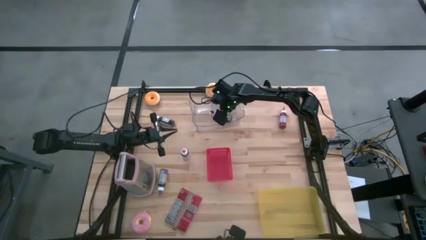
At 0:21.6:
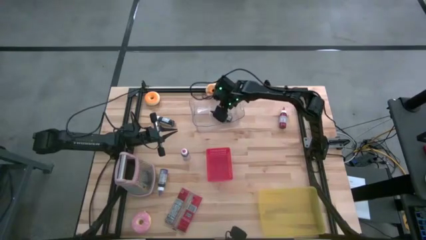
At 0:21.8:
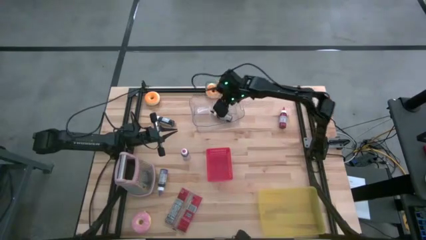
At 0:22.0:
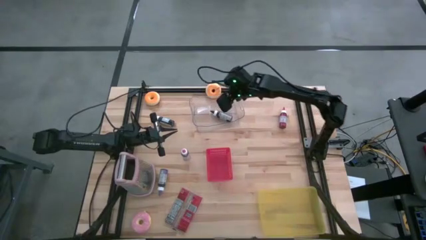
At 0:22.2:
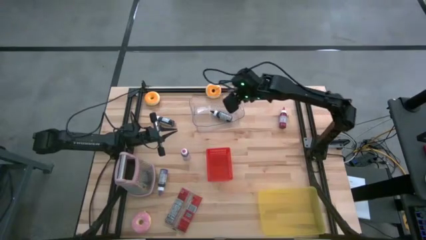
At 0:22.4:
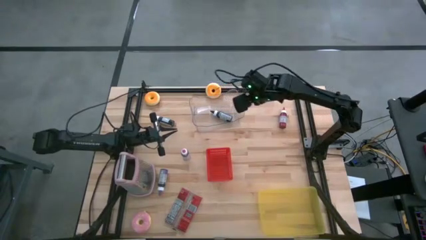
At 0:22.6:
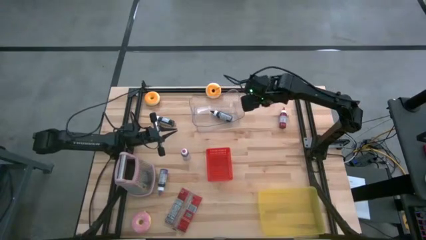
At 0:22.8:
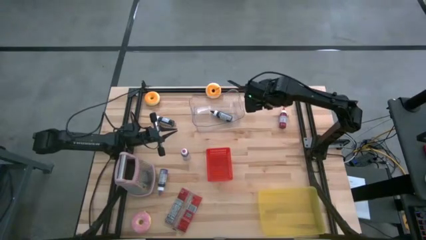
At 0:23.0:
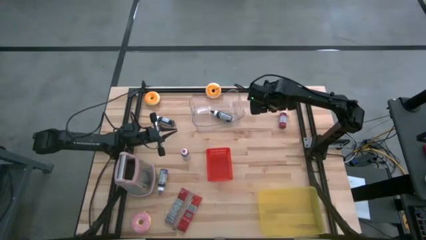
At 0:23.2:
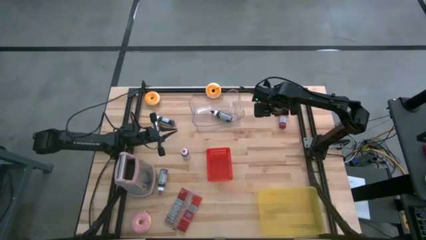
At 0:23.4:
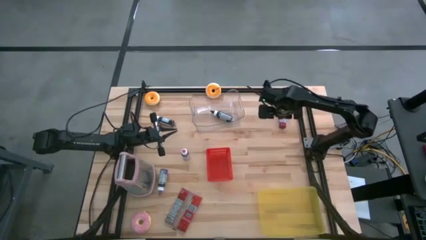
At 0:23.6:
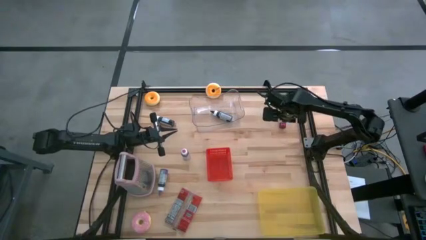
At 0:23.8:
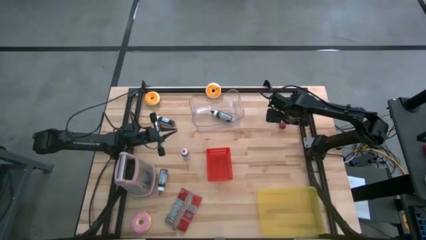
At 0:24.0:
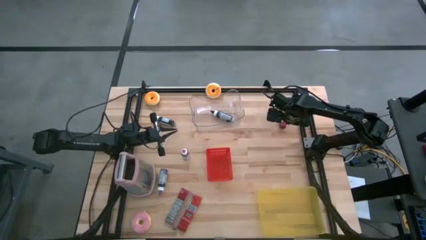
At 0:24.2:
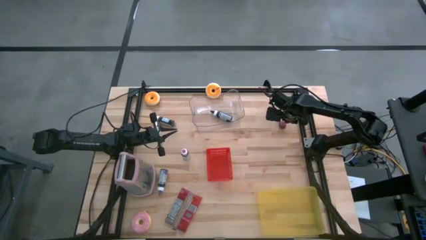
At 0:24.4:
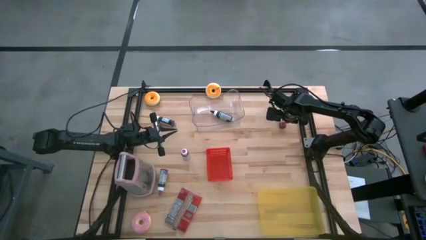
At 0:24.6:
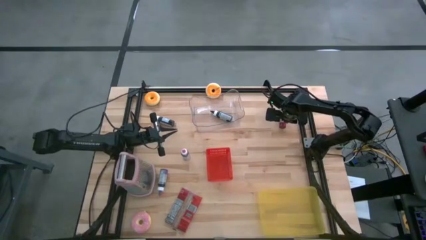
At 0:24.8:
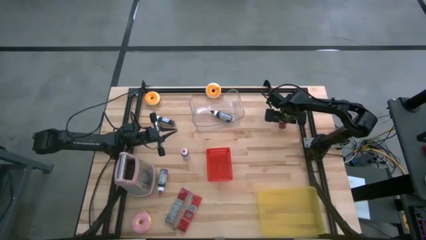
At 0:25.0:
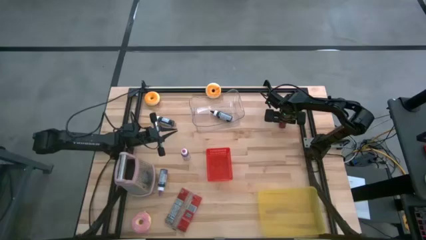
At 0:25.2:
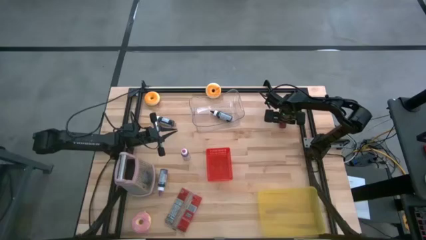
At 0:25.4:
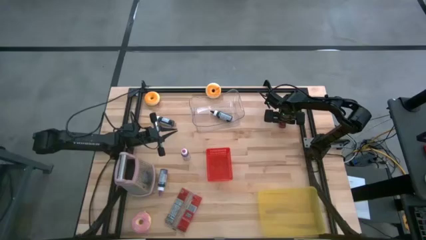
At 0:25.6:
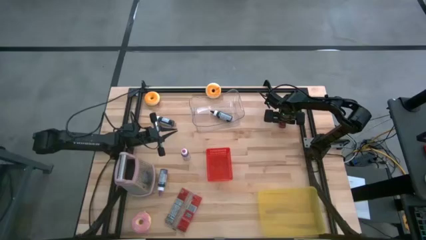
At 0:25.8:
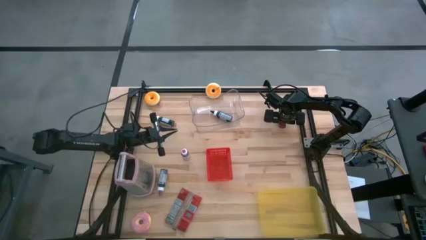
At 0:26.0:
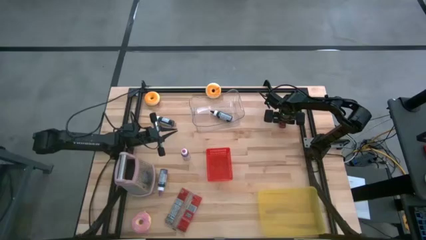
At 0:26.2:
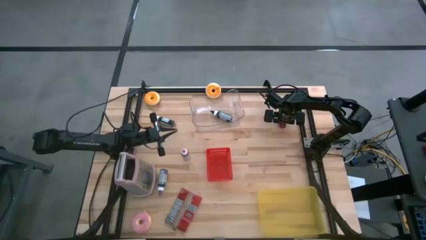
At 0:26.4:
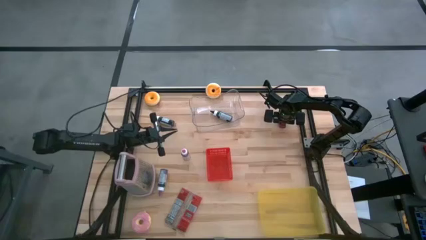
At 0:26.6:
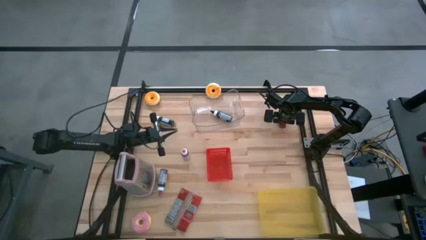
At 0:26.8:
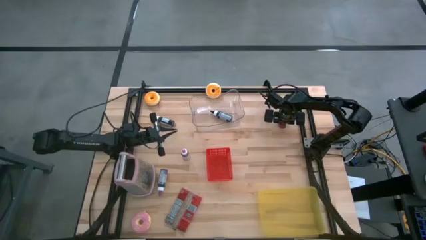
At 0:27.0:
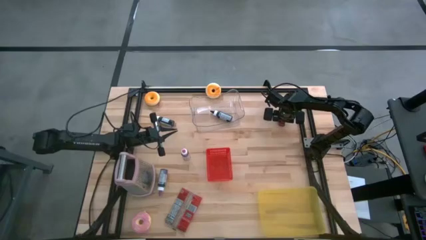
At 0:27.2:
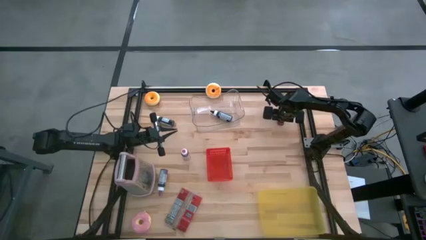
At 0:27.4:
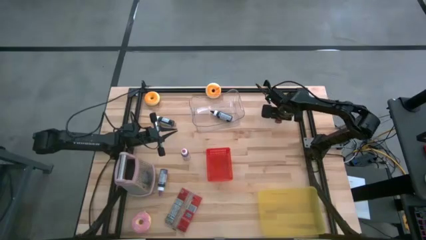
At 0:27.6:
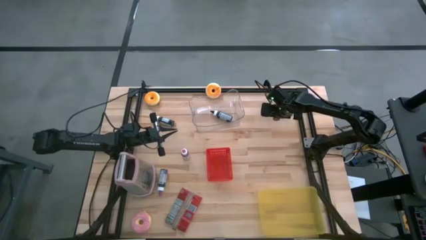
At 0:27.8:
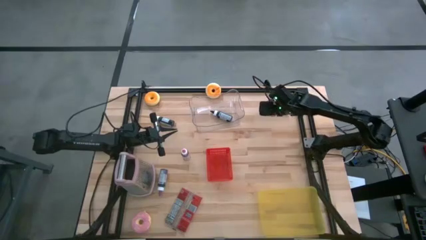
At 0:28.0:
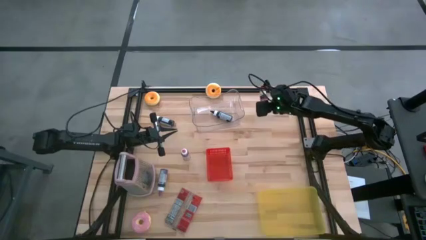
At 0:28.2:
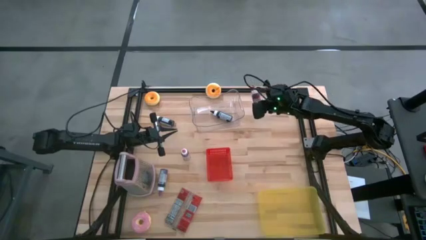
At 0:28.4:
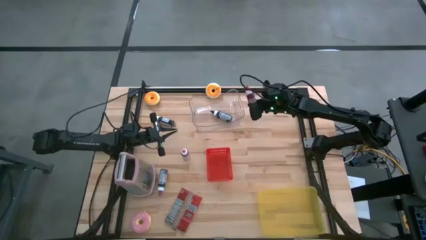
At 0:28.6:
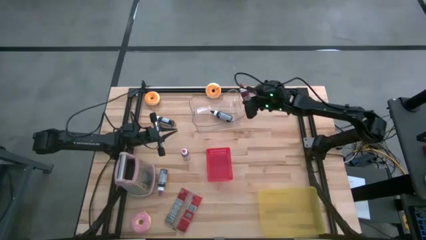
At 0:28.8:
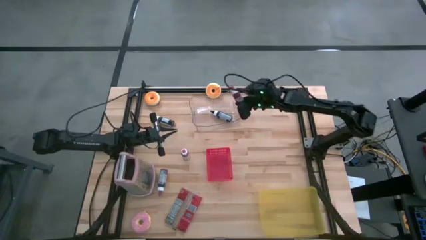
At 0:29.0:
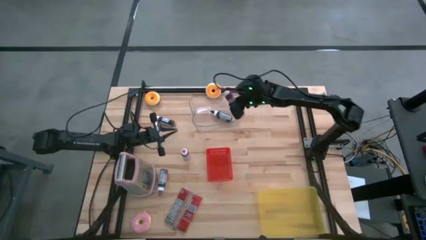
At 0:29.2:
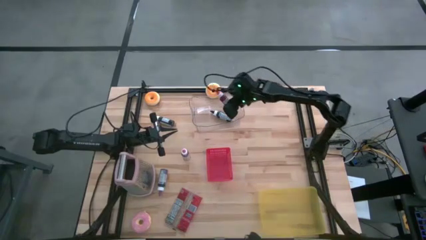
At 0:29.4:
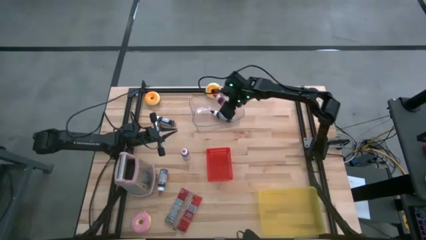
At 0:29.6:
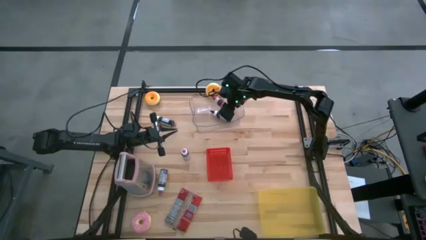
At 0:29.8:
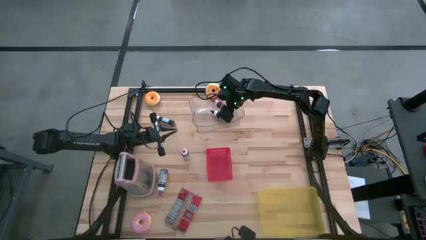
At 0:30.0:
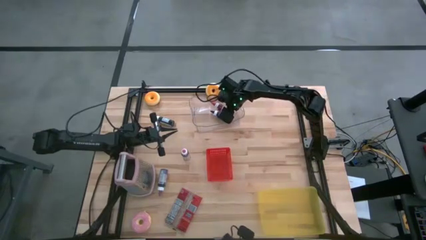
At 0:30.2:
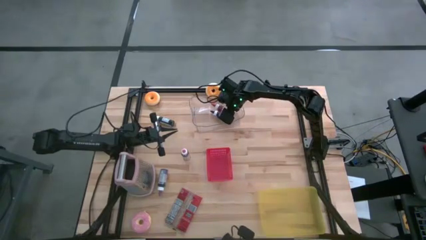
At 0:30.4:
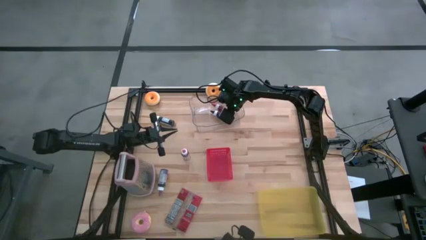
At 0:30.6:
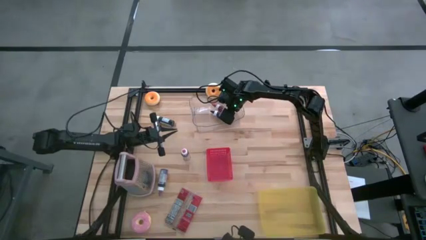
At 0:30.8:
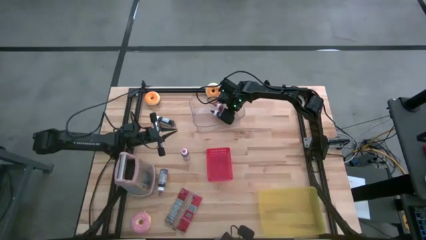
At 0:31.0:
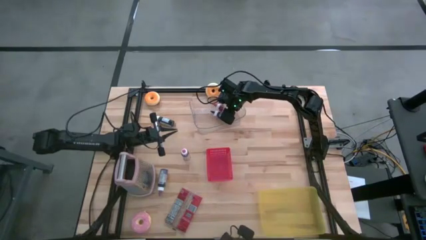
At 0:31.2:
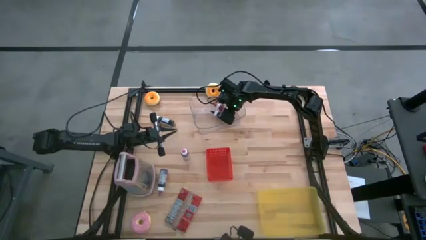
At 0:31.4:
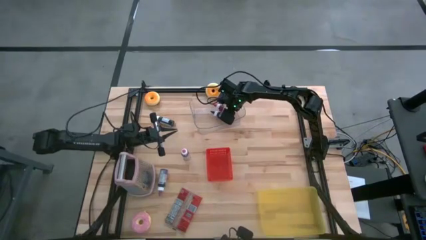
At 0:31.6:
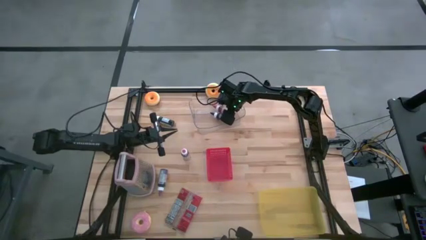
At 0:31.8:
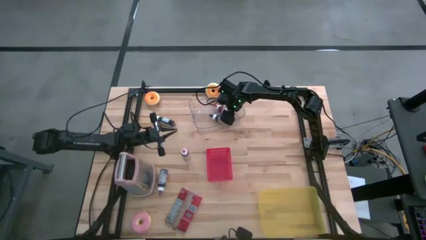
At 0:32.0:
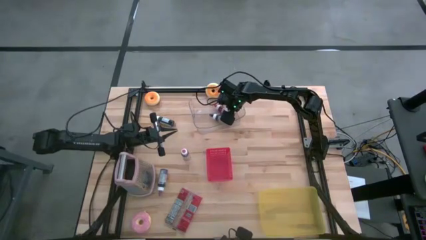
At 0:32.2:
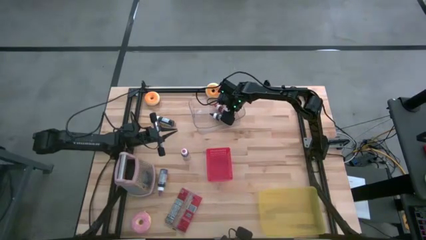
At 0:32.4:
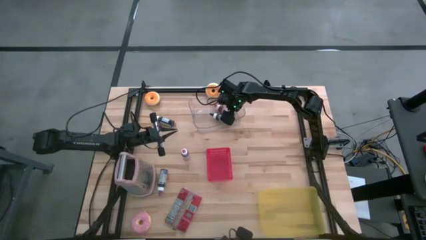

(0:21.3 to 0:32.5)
Task: Pick & Place Food Item
Put the red food coloring bottle into the transparent bin
